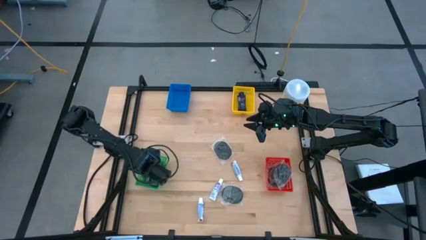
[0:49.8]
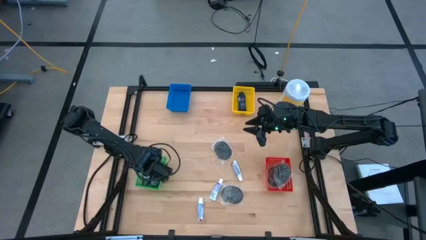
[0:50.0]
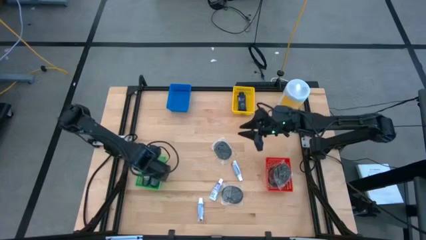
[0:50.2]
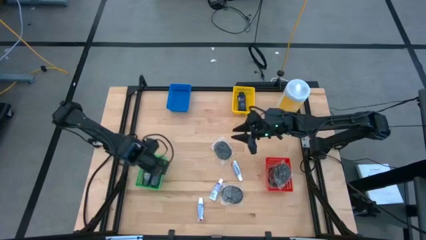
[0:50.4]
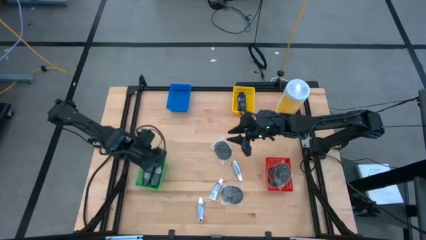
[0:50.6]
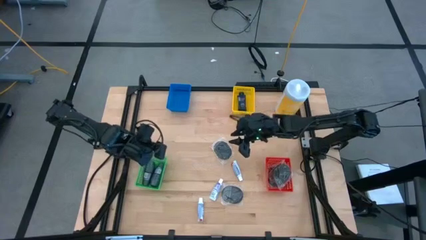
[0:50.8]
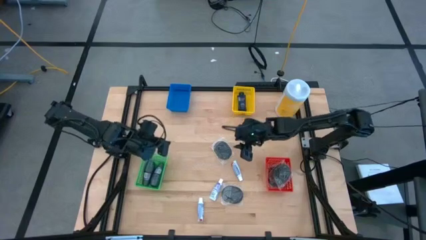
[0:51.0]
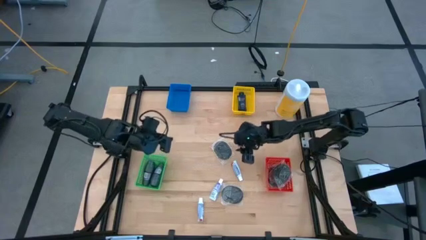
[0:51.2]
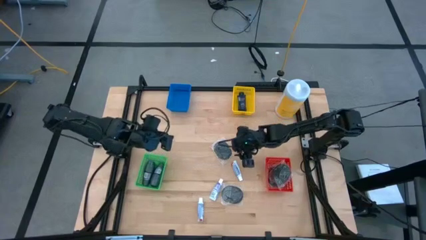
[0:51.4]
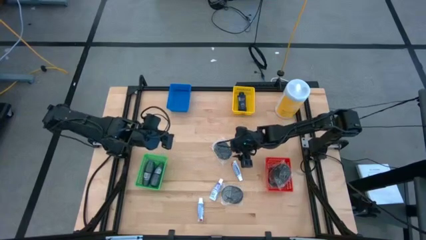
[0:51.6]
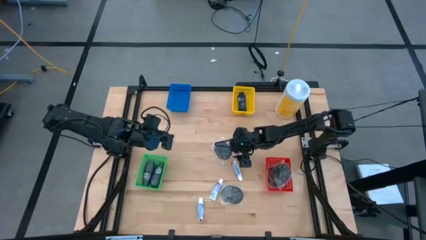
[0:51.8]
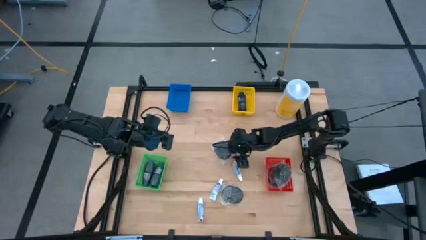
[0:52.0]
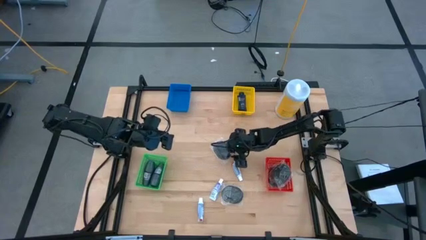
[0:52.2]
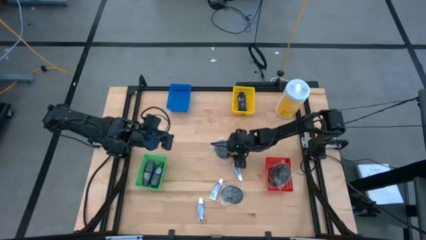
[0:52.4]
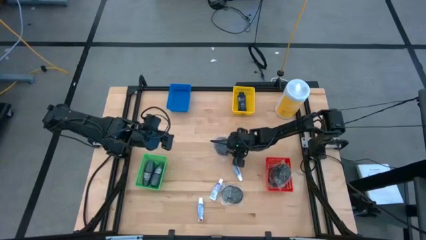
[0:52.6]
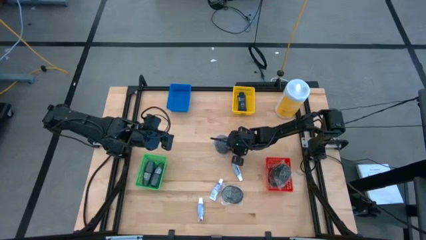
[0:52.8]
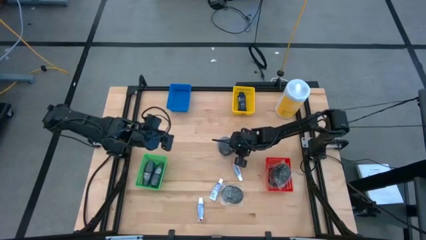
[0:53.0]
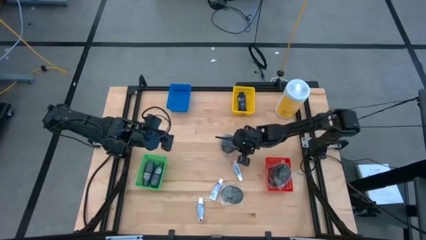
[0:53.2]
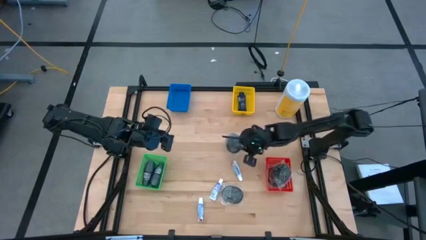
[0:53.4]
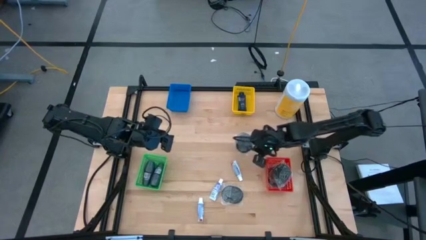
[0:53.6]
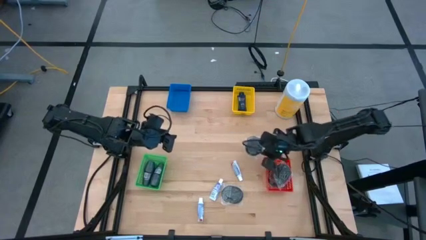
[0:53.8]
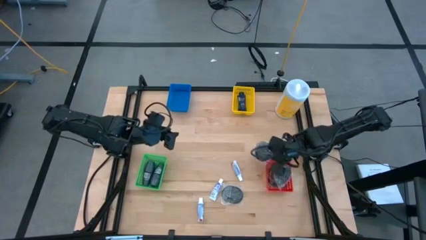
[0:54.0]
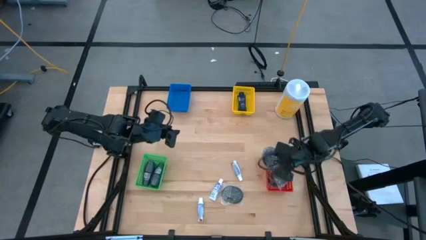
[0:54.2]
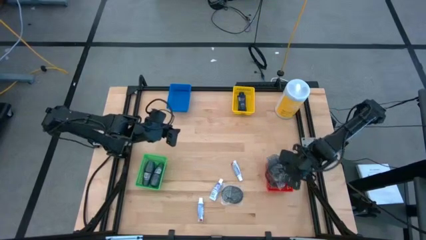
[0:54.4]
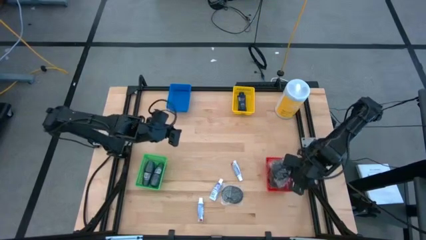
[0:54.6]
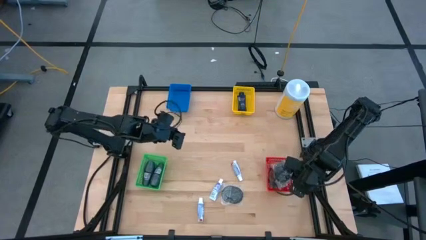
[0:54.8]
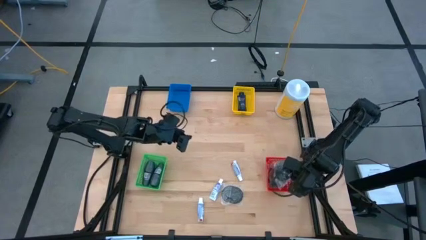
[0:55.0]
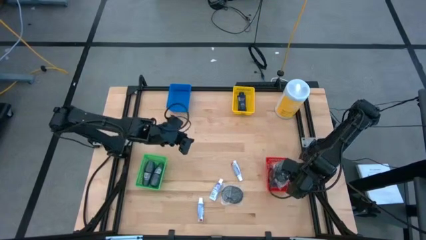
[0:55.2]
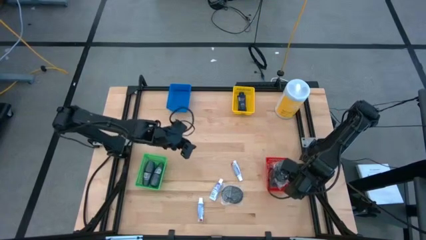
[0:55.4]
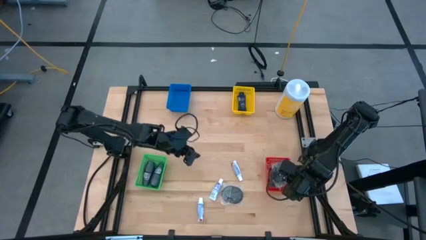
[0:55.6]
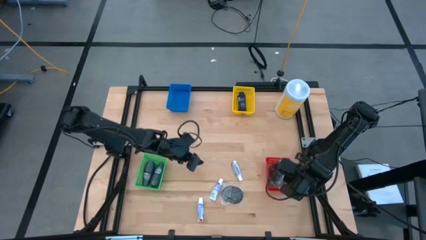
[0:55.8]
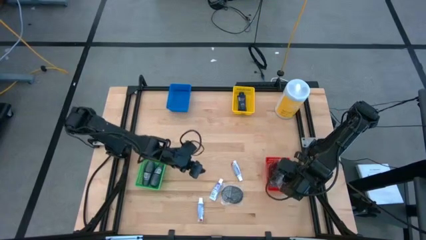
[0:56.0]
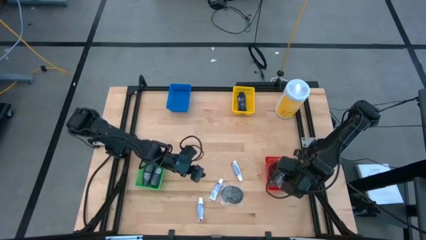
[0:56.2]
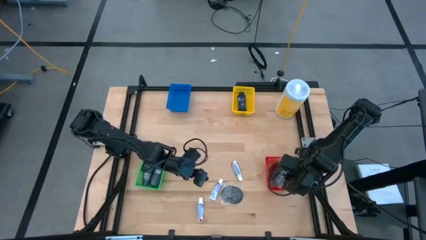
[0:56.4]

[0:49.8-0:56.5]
Task: Pick & Place Travel size toiletries
Put the hairbrush into the red basket

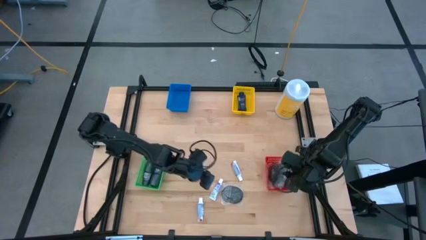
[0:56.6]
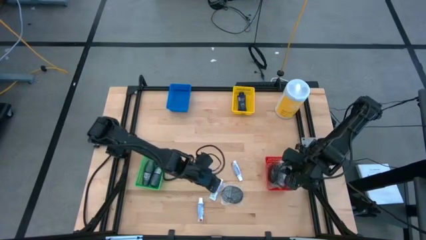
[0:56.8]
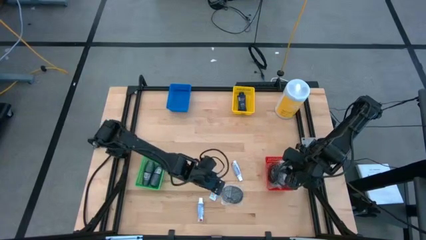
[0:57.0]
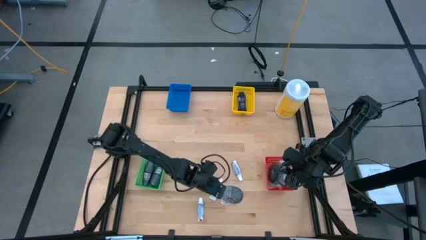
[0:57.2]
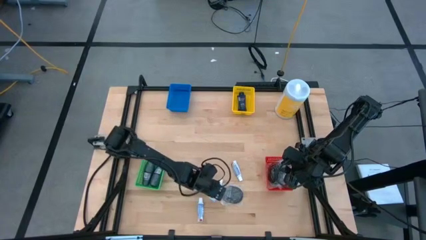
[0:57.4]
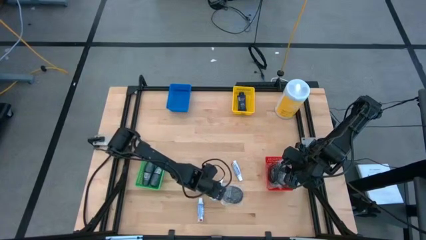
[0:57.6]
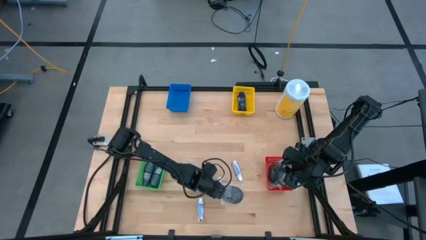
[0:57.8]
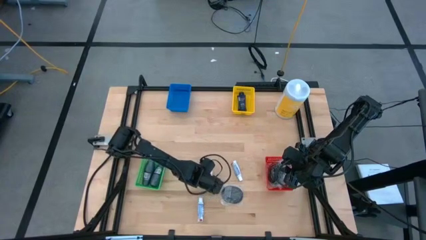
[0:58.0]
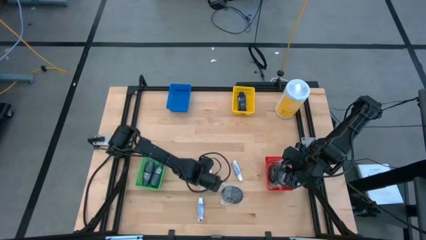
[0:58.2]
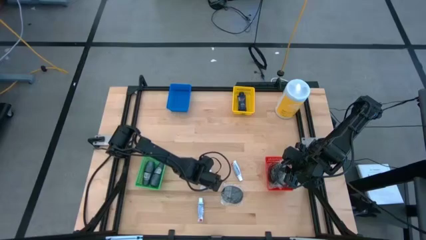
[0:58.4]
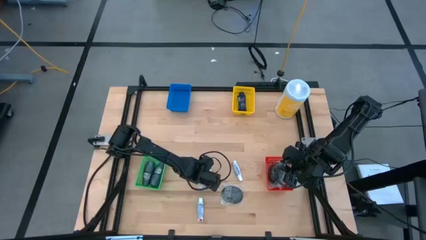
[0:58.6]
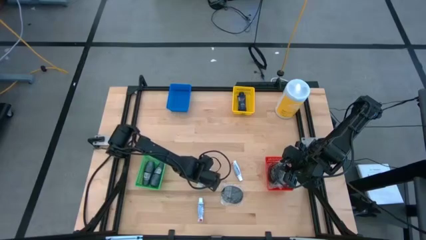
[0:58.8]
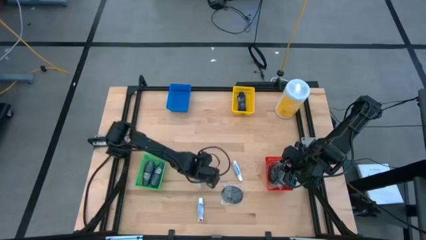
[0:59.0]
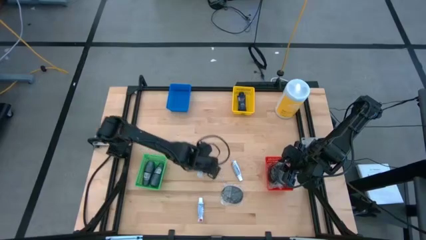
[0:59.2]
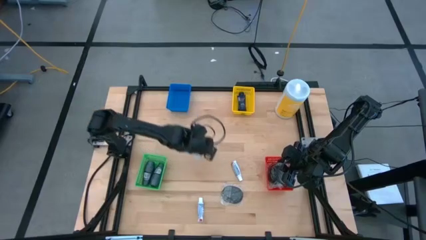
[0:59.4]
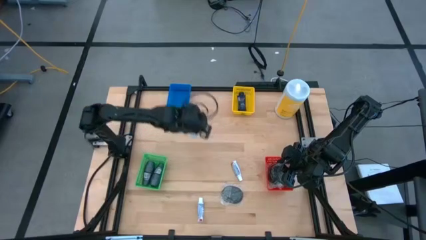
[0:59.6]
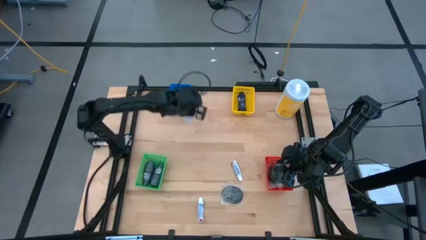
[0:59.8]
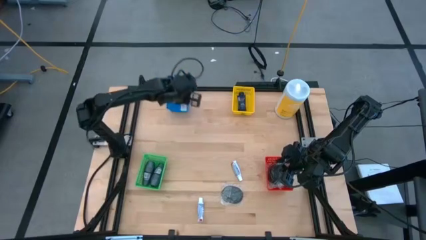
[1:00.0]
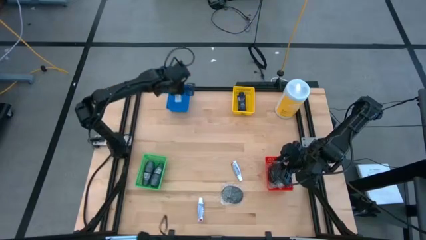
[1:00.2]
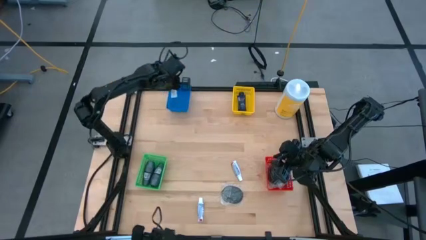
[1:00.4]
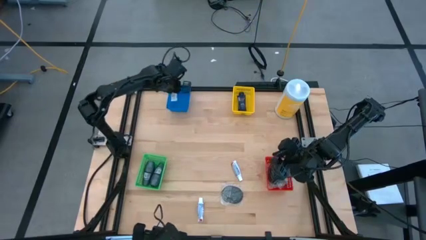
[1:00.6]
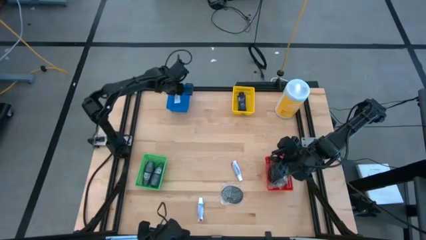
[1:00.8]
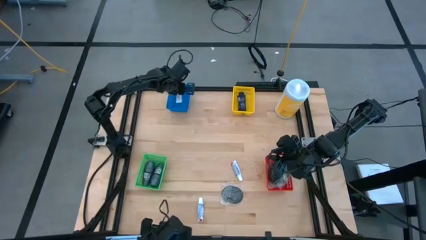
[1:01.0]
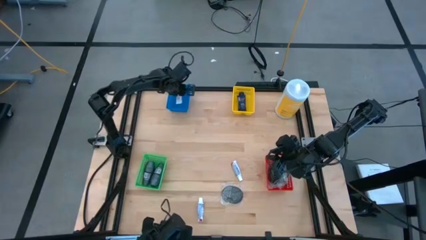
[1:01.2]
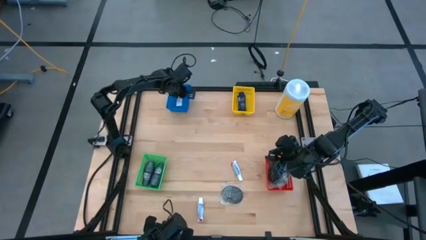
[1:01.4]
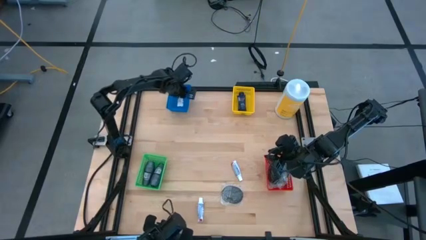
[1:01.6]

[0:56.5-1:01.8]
Put the toothpaste into the blue basket

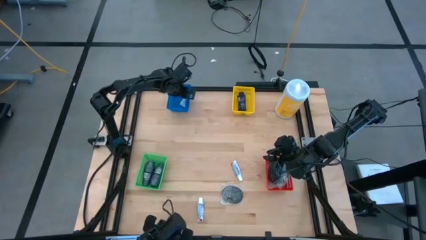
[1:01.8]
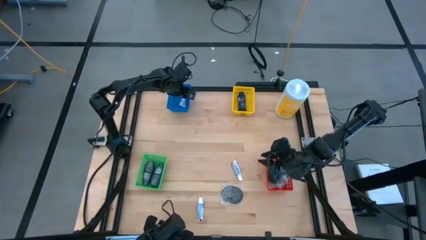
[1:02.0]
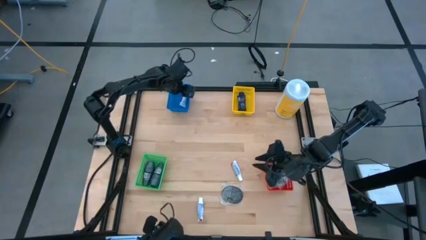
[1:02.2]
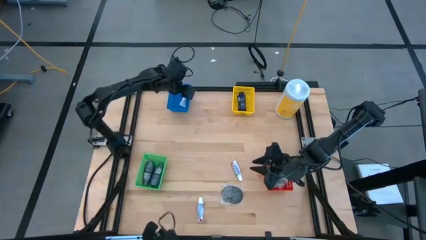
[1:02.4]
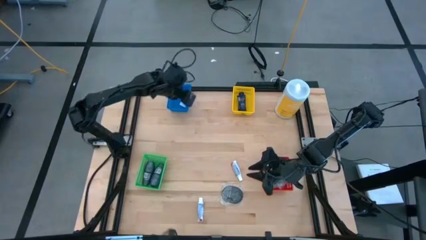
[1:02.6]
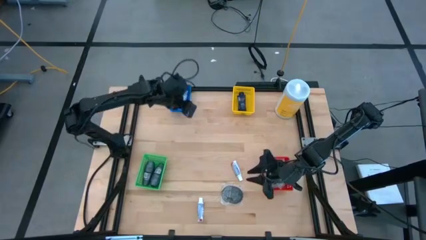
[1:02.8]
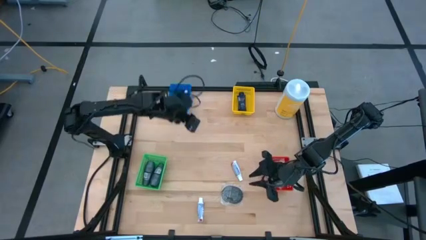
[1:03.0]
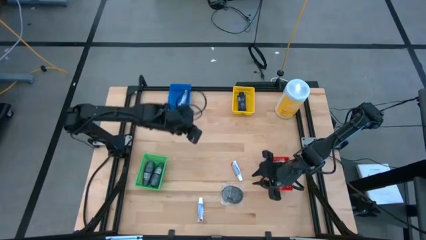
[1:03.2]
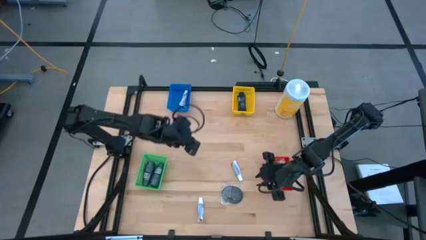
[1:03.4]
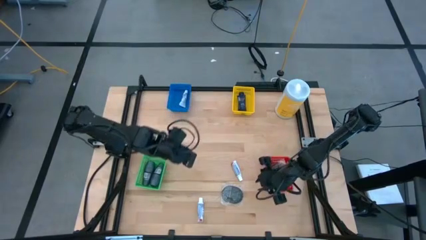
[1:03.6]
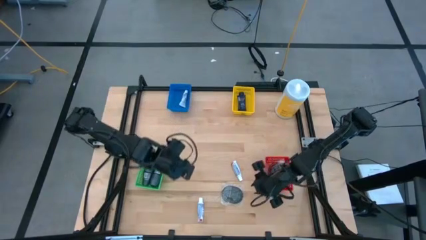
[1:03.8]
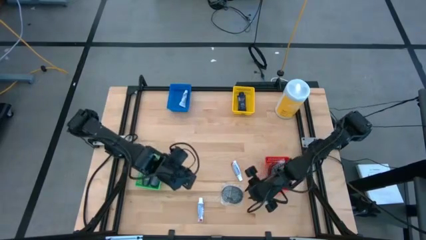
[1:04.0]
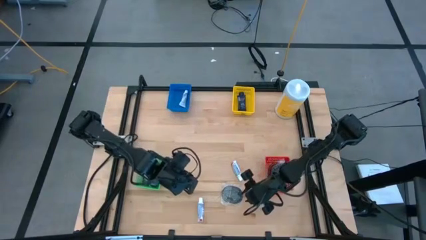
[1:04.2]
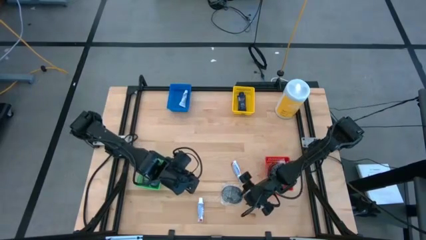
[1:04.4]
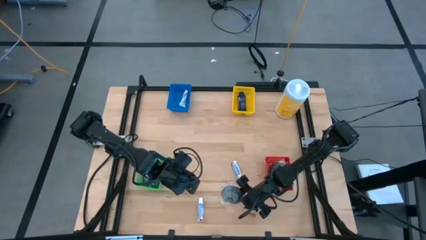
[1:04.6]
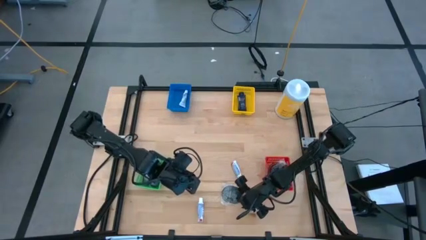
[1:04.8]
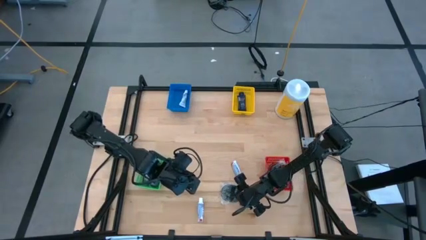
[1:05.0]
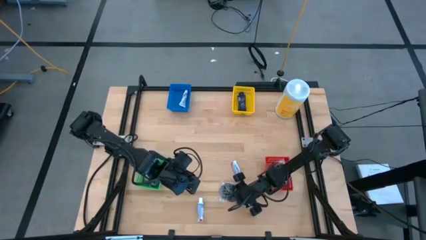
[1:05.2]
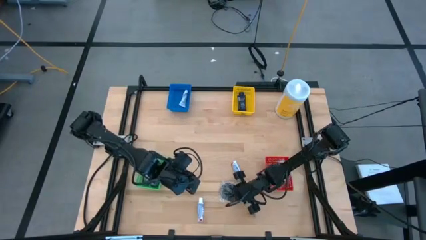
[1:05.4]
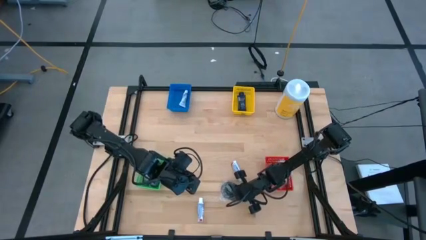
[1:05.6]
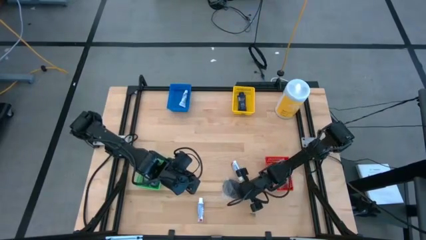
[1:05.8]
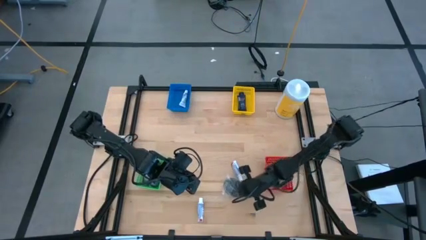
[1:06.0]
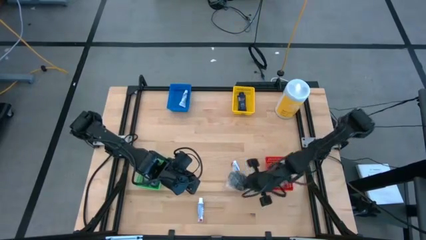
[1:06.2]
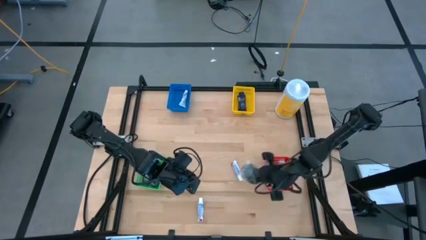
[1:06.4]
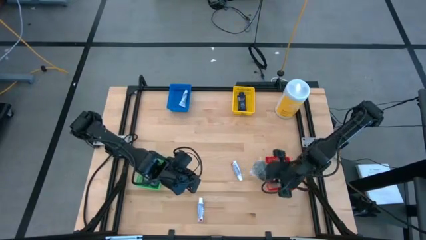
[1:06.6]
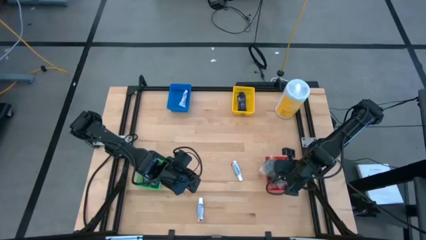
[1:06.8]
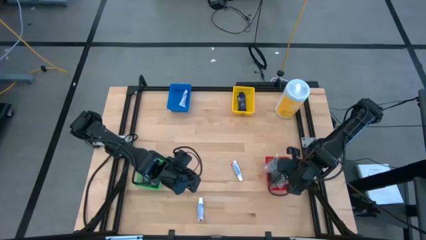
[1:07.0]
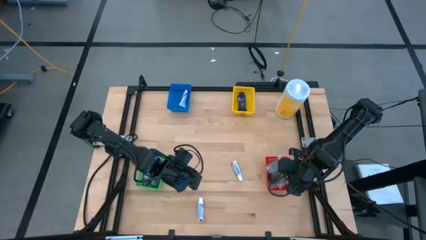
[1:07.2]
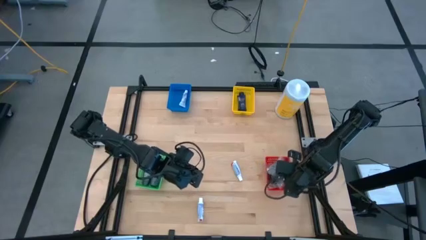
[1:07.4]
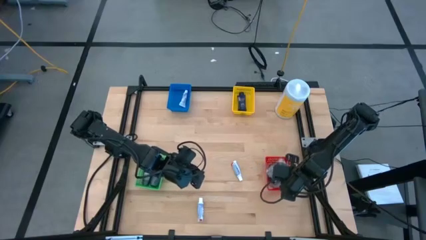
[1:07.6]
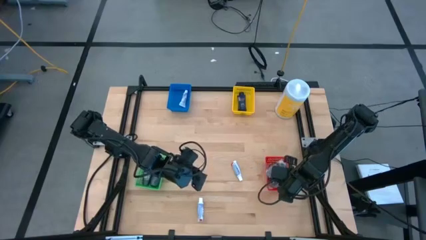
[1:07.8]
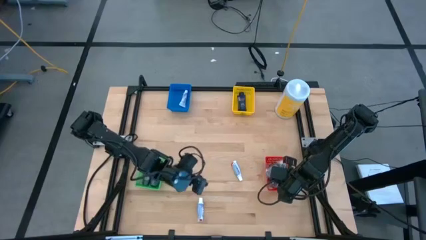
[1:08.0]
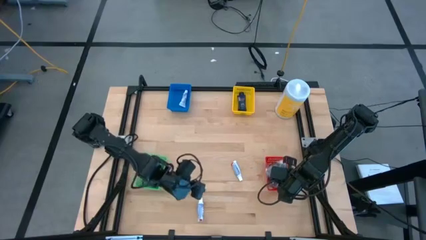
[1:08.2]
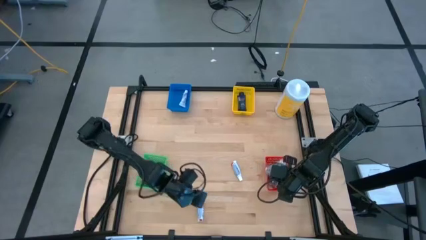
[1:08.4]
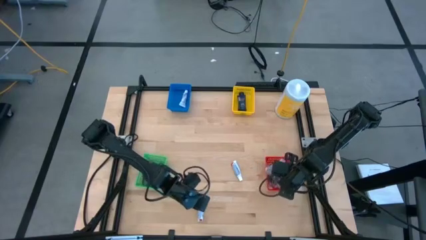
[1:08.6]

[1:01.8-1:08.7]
Put the hairbrush into the red basket
